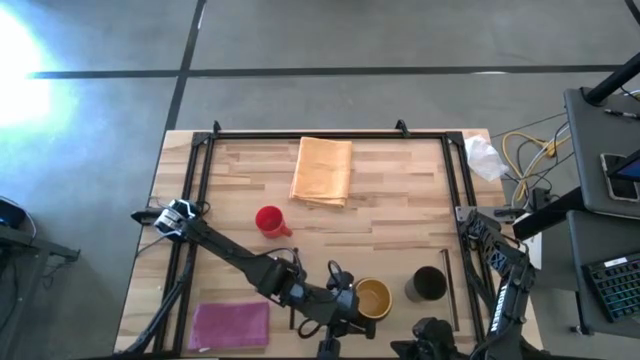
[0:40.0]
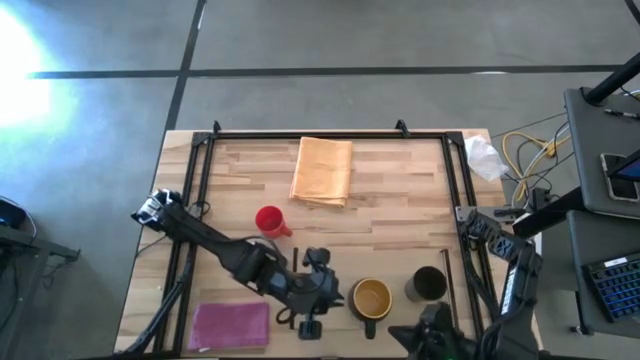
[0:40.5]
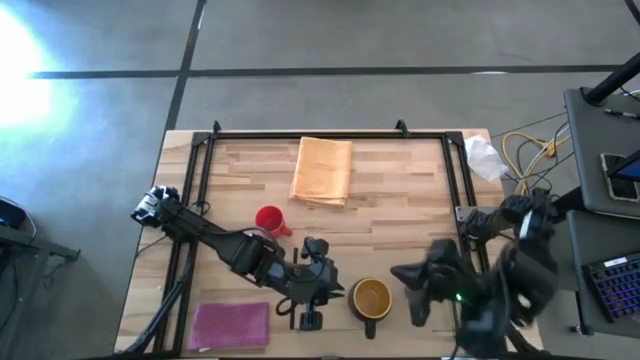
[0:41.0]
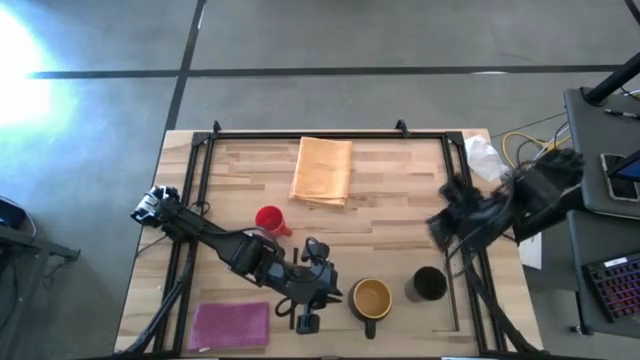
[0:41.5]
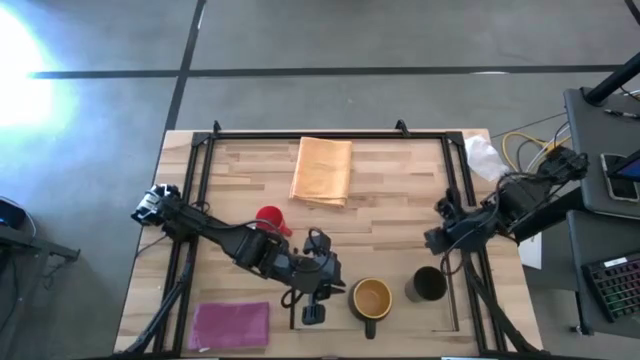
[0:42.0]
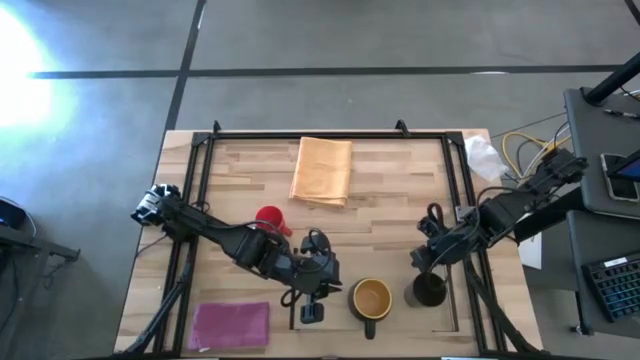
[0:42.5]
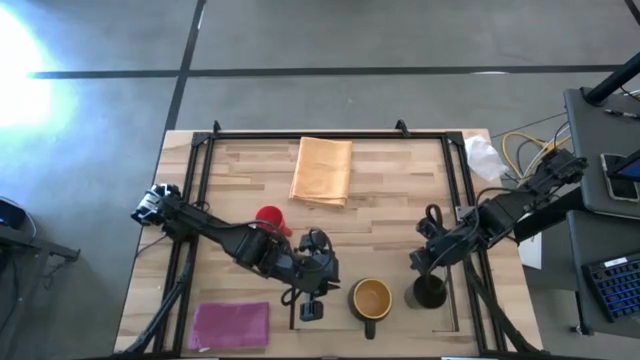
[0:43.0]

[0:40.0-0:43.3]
Task: Stack small to large cups/mugs on shelf
Adjust the black cup on the shelf

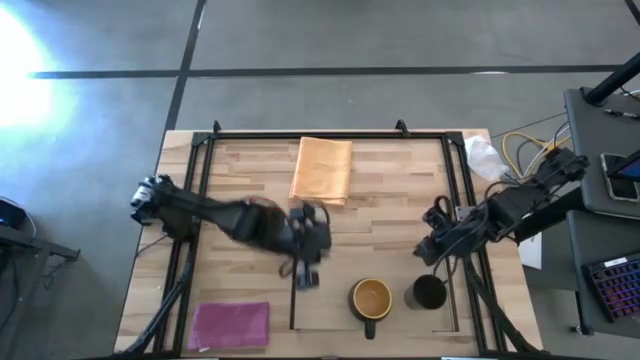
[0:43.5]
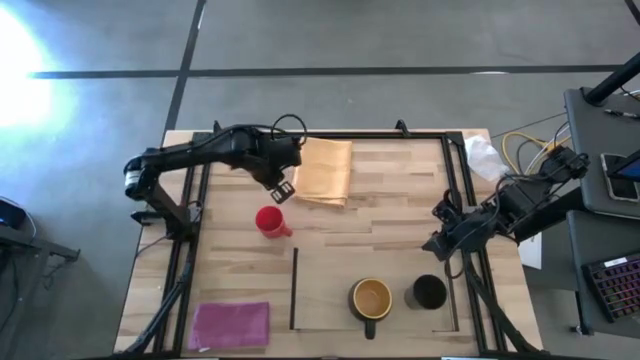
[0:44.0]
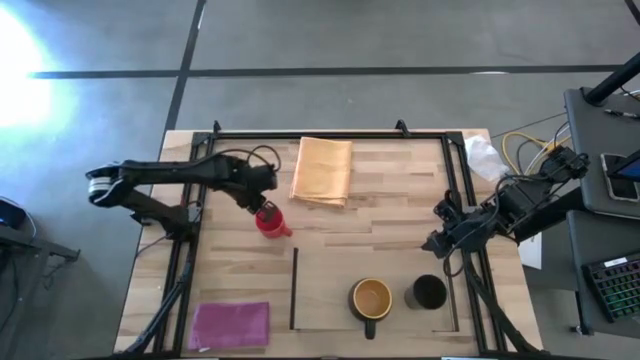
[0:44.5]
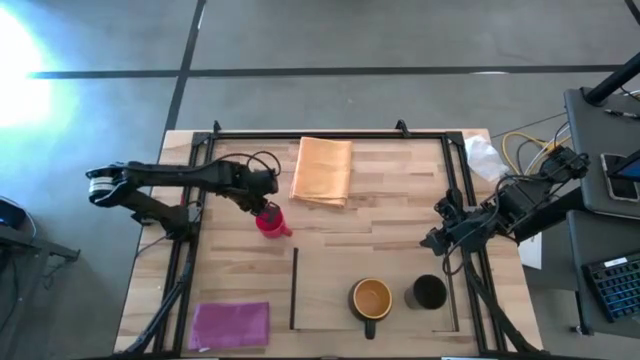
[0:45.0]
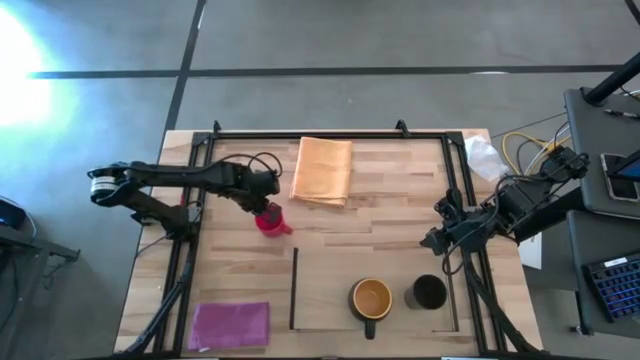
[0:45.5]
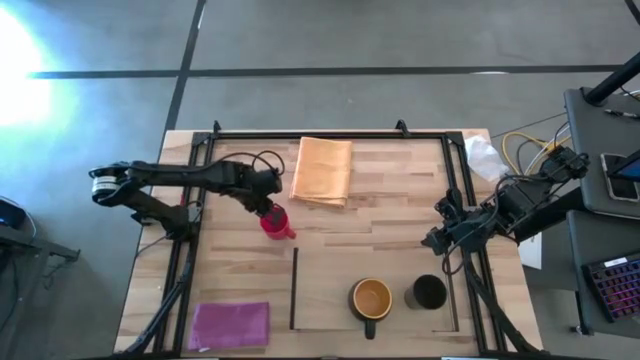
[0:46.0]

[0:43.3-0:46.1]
Put the red mug on the shelf

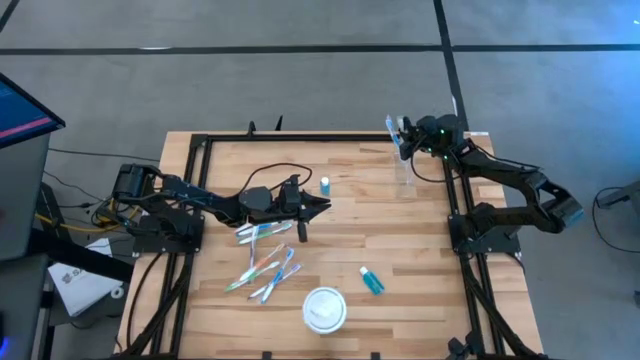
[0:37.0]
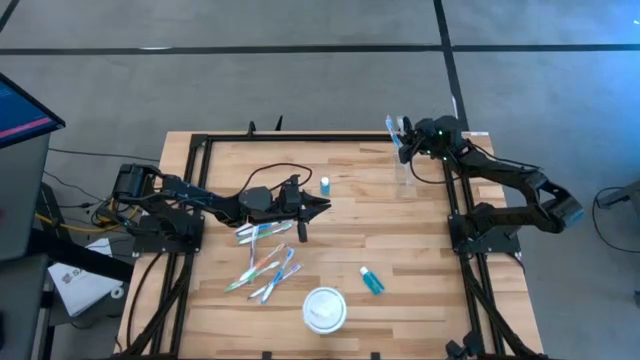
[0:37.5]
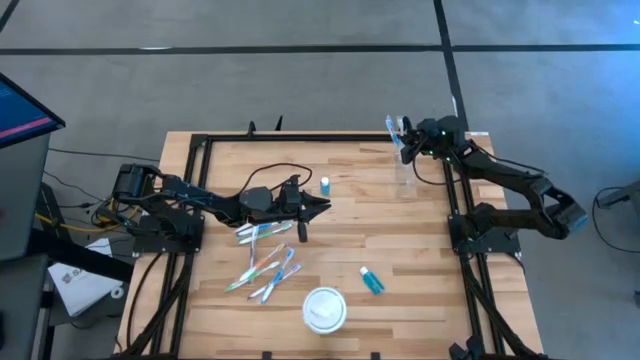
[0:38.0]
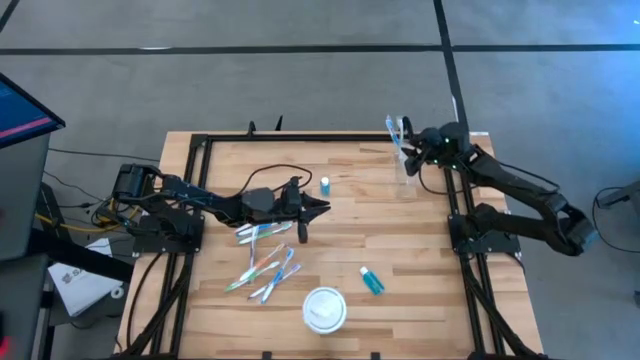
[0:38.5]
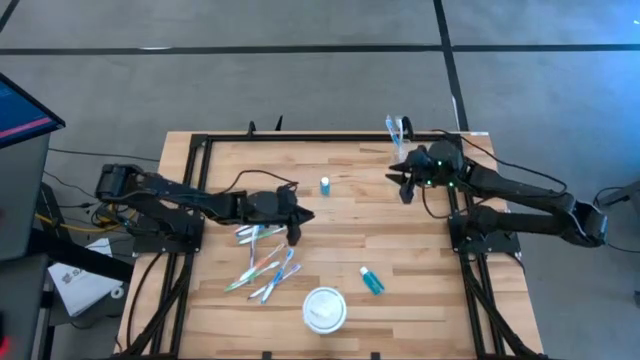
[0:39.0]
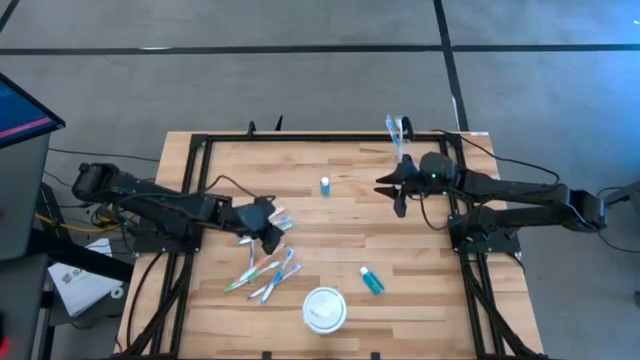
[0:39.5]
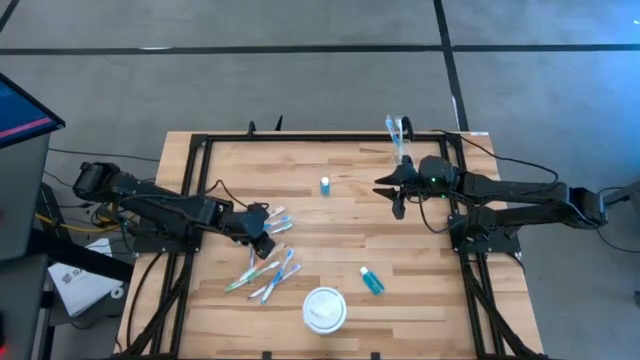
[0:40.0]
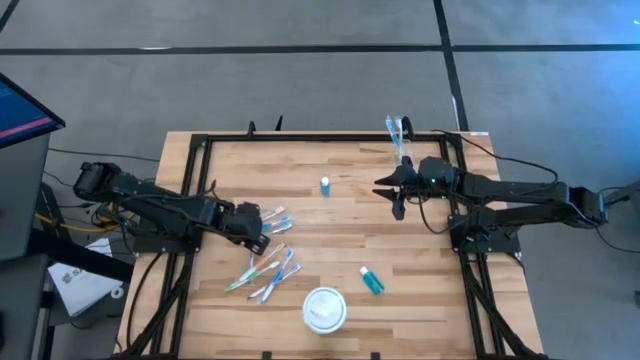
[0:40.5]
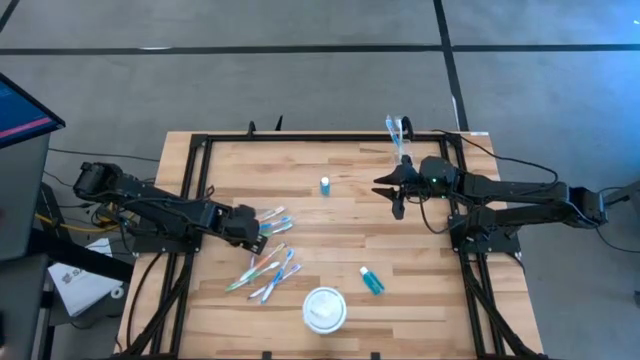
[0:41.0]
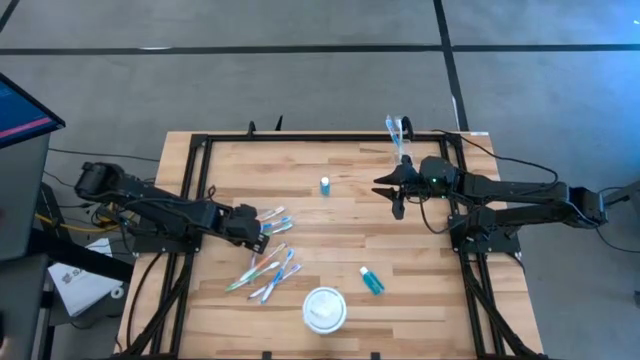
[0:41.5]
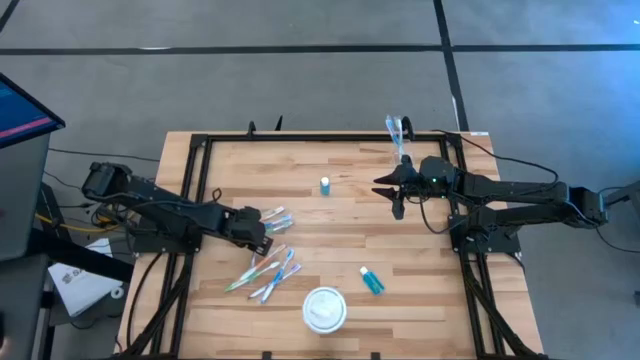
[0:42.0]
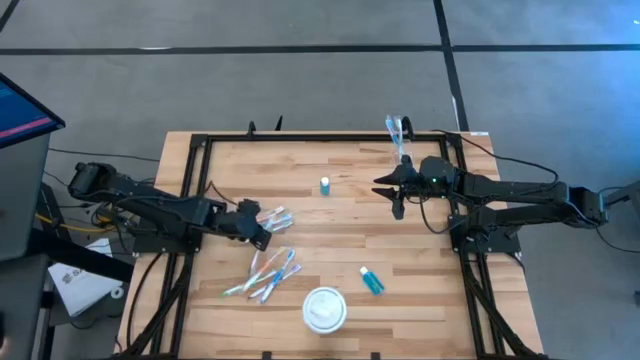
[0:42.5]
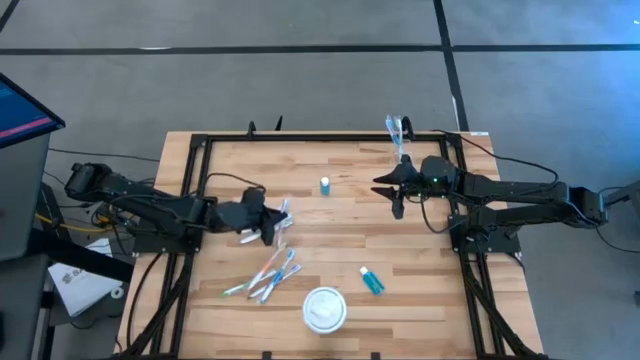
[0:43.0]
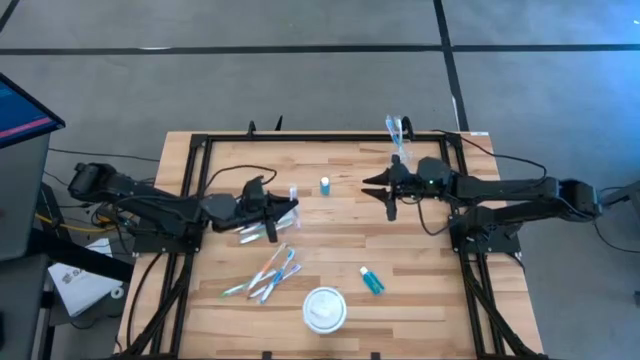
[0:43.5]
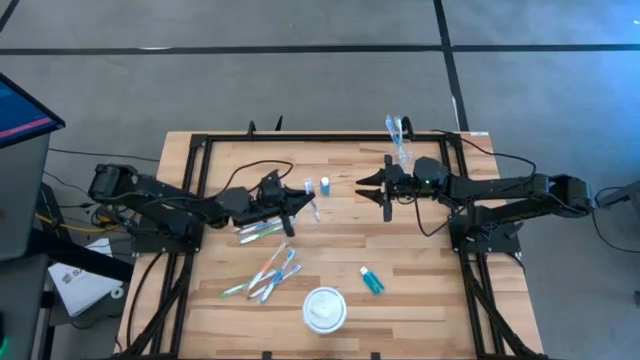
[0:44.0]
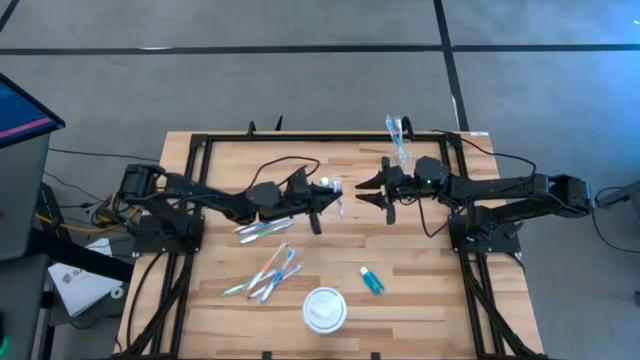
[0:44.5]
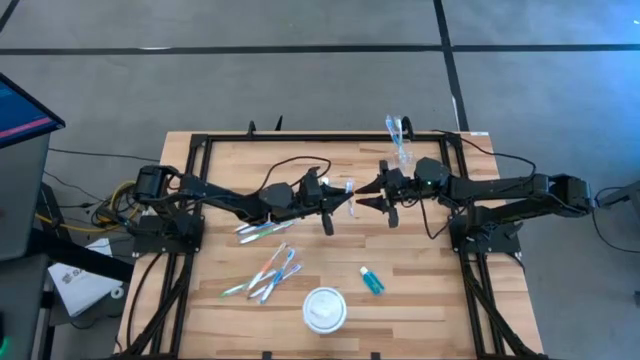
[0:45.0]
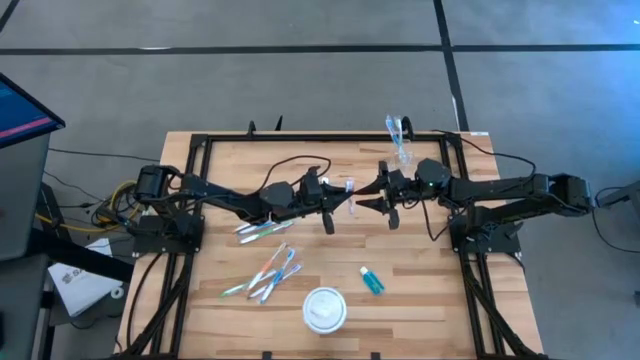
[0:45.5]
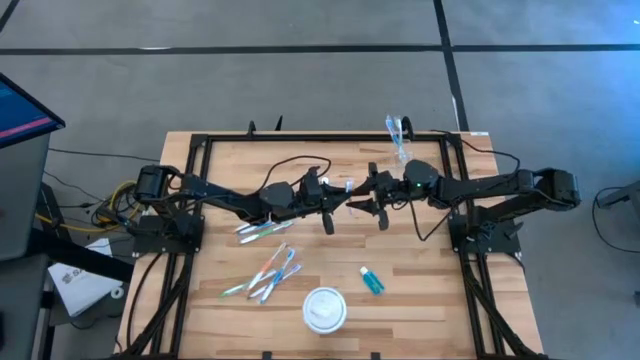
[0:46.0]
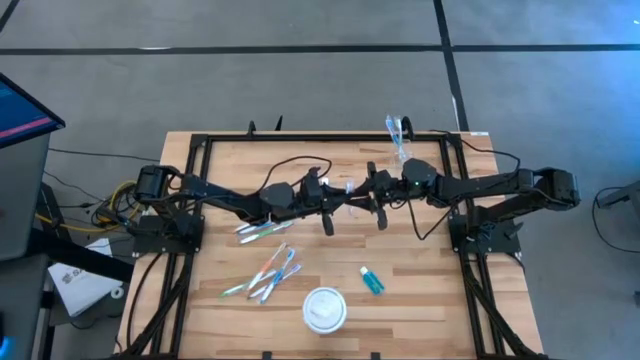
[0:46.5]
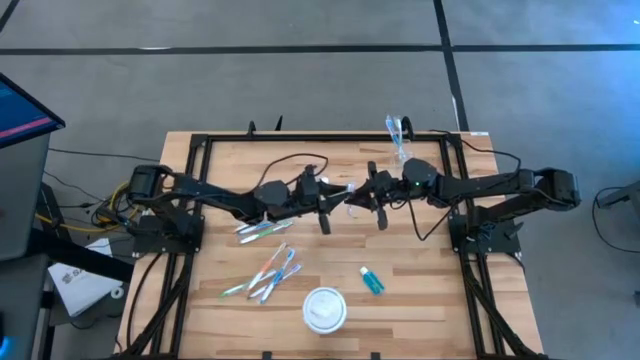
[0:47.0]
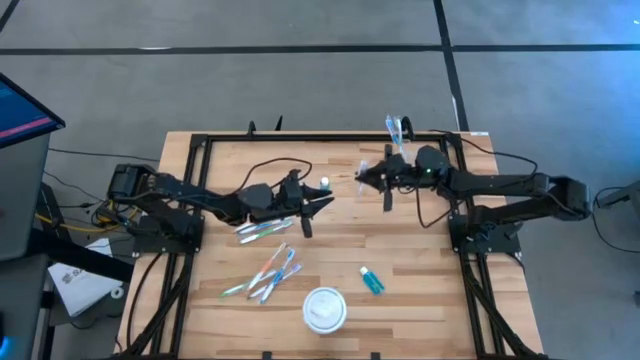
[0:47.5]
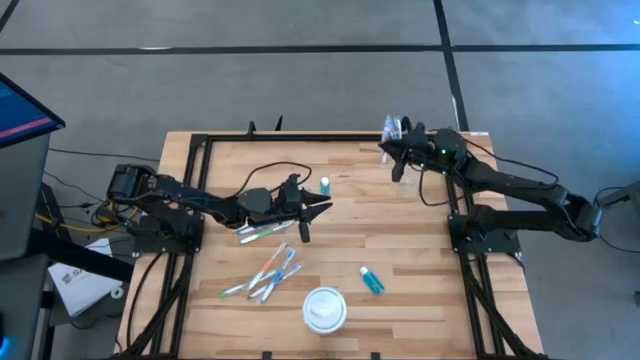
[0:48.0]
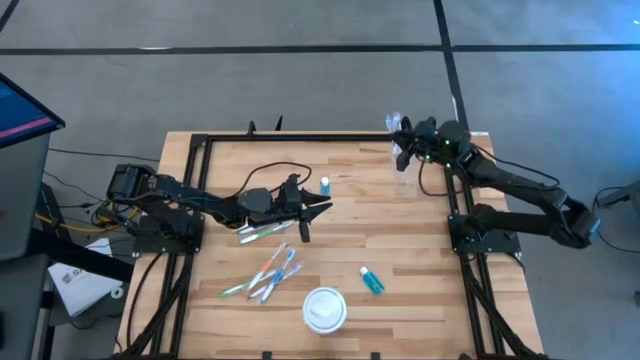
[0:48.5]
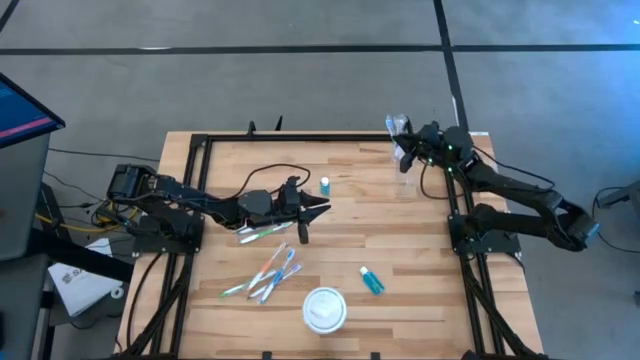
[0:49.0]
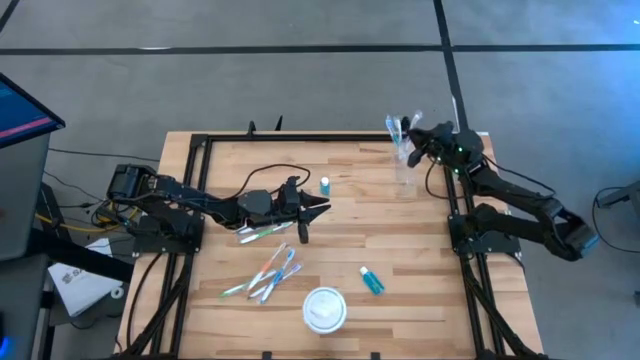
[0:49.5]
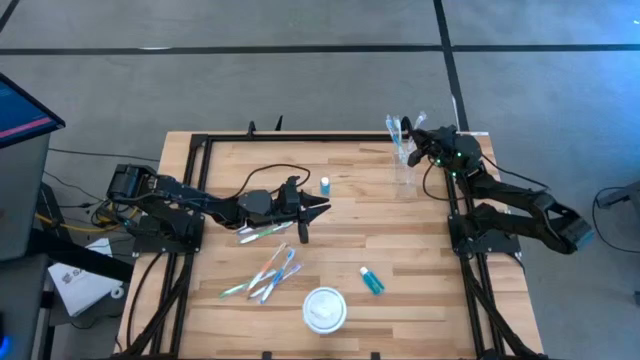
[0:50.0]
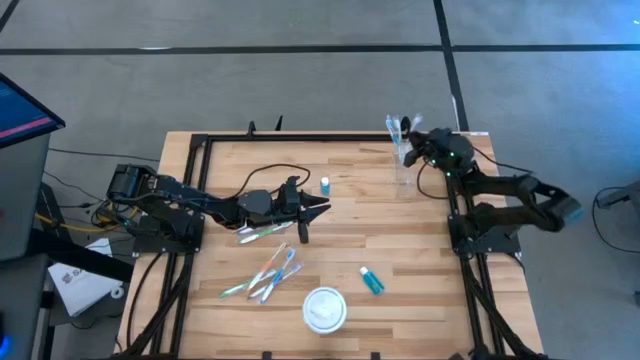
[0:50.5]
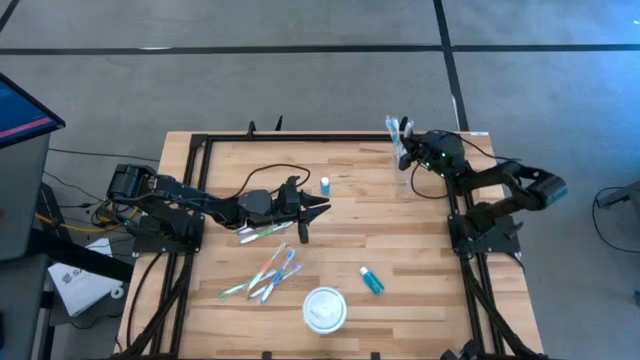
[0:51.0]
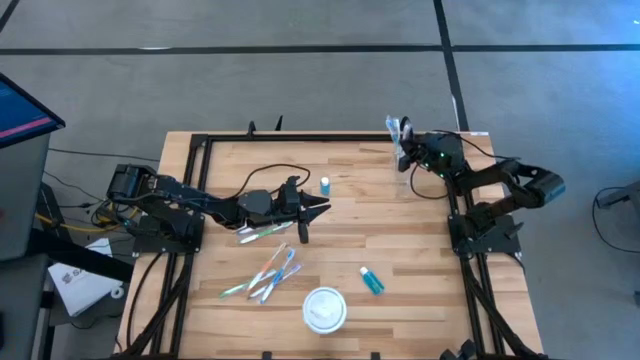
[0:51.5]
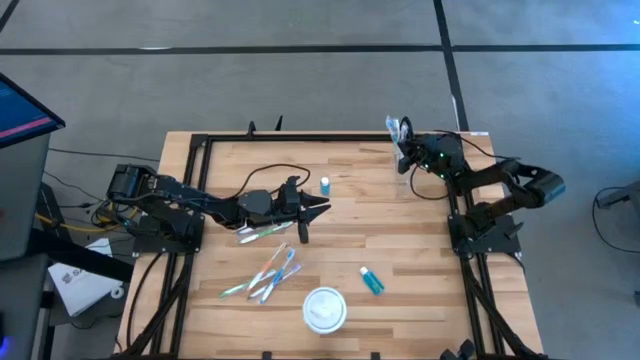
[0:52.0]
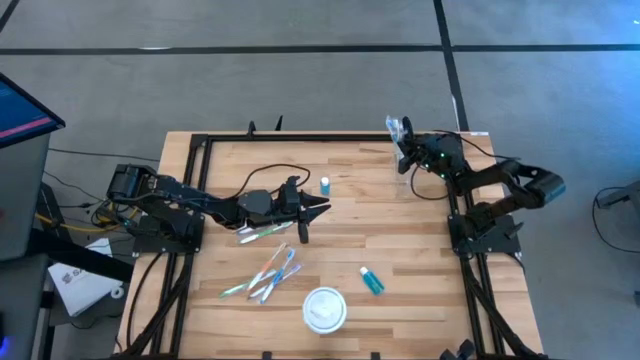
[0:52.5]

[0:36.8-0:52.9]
Task: Pick & Place toothbrushing station
Put the purple toothbrush into the transparent organizer
